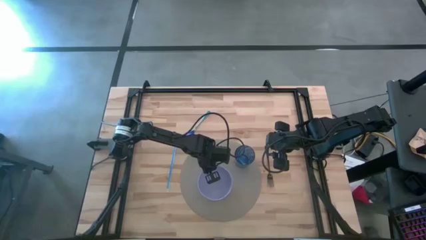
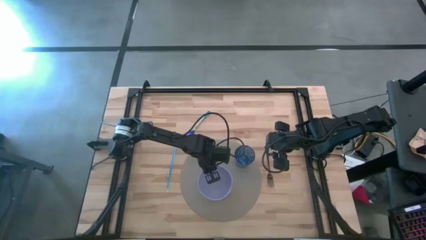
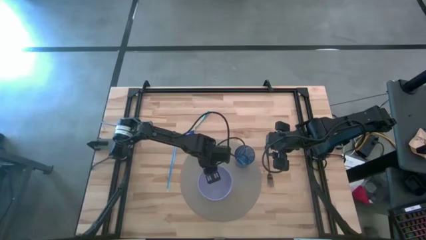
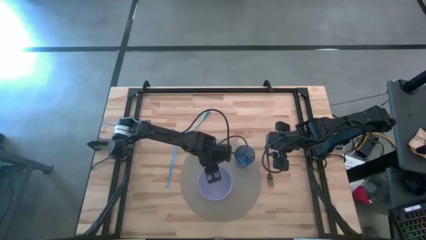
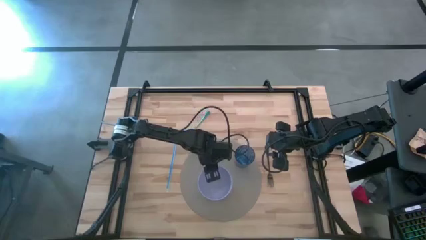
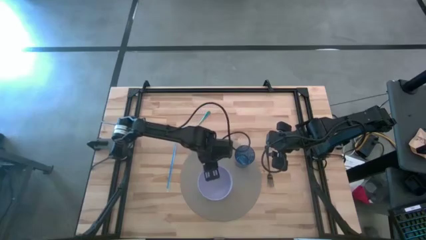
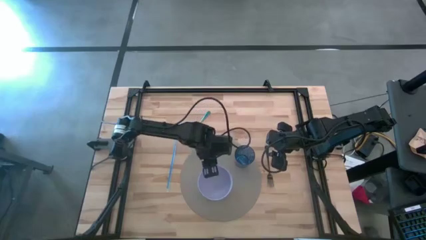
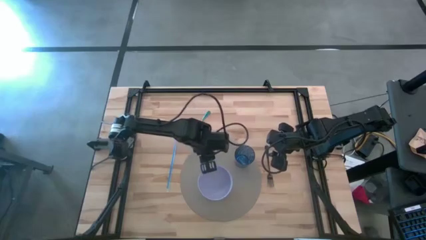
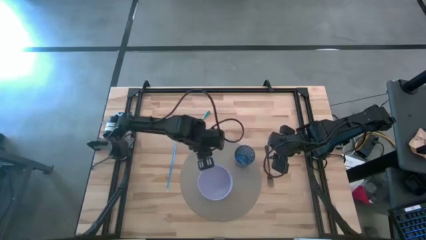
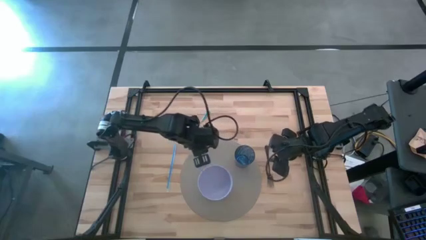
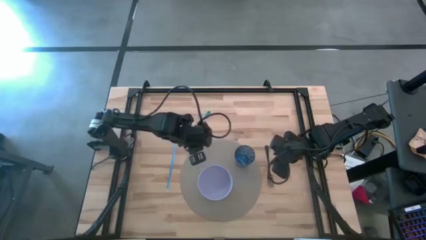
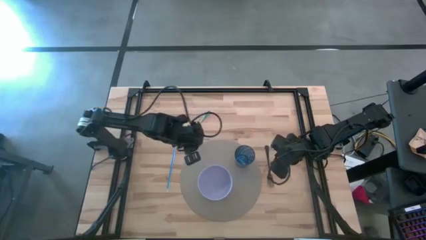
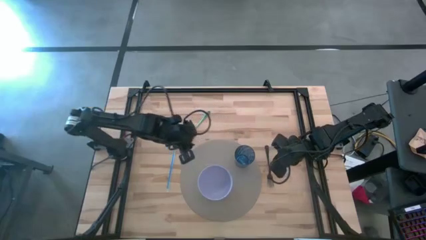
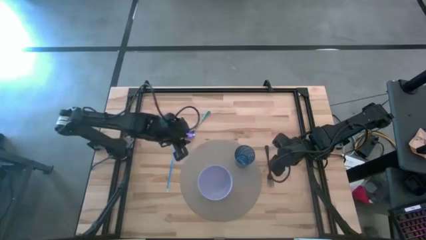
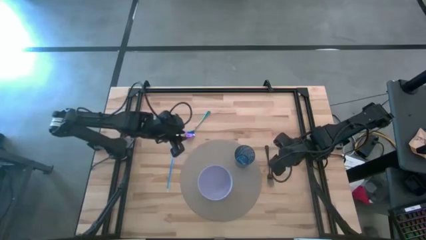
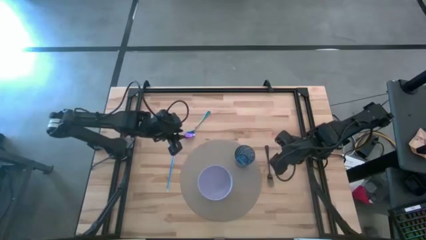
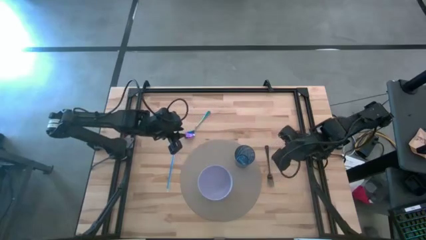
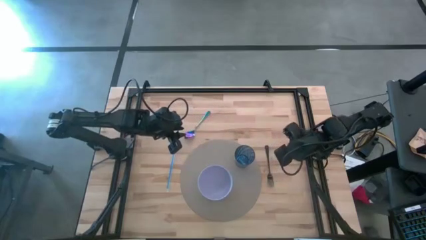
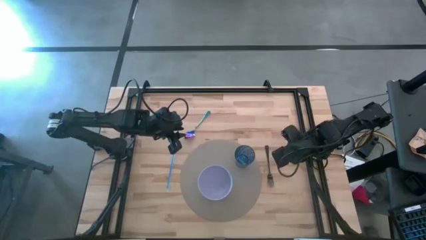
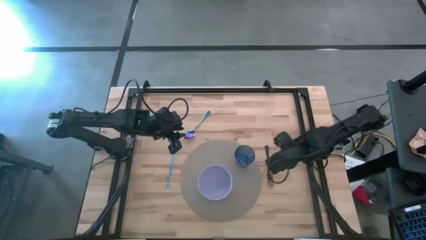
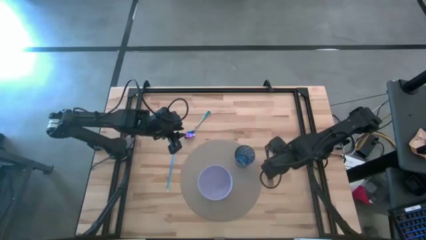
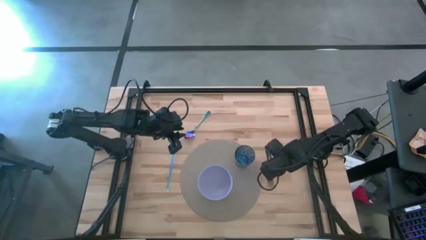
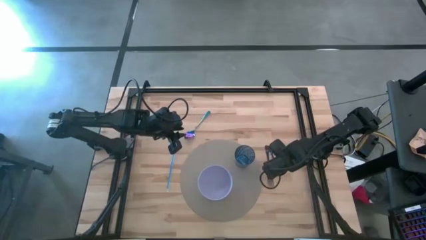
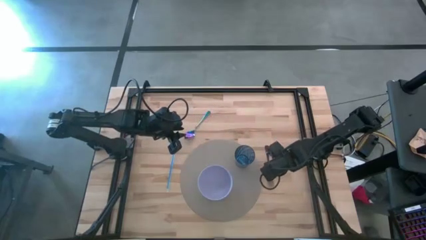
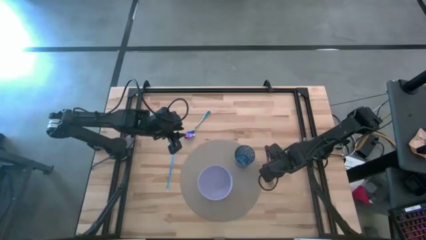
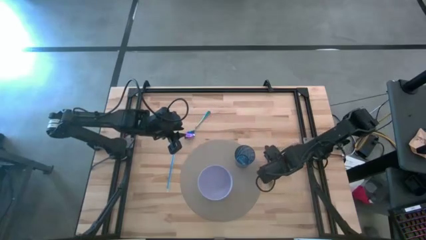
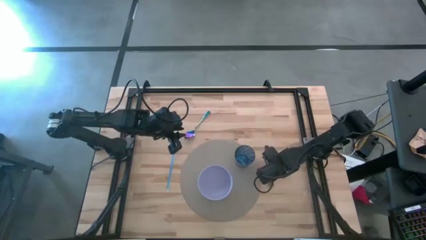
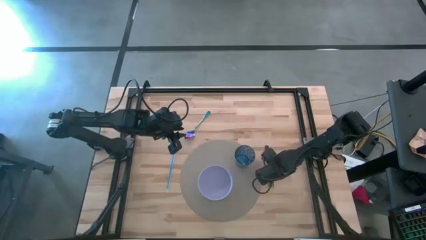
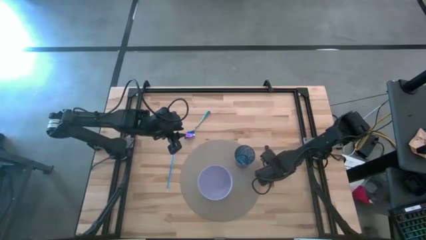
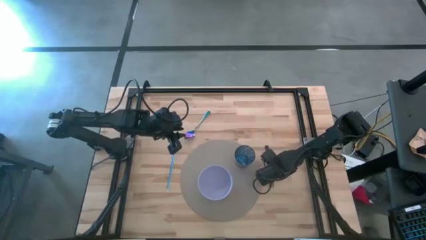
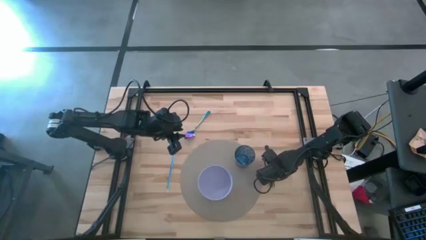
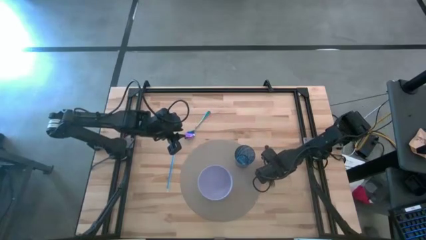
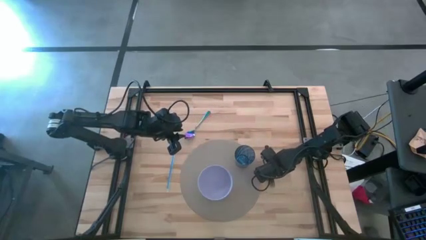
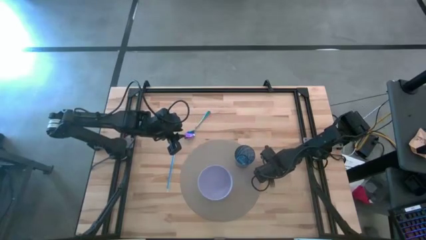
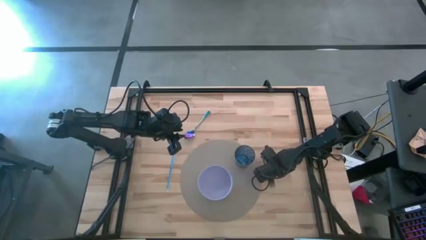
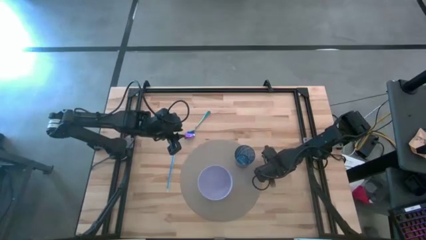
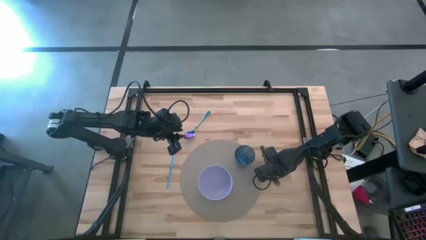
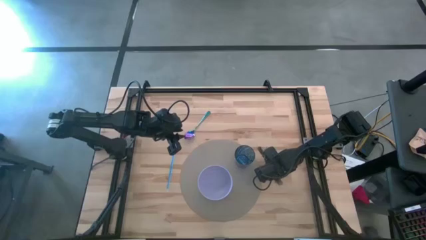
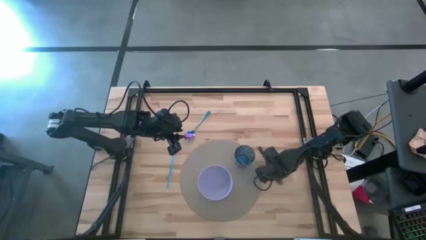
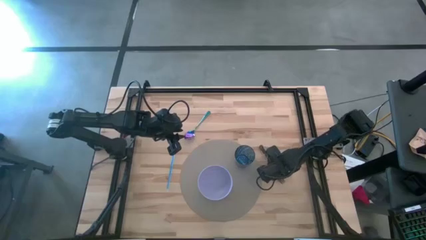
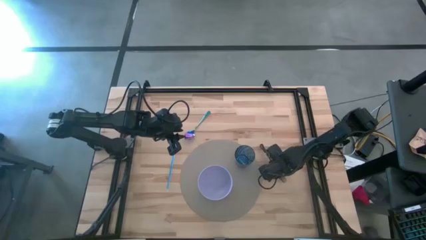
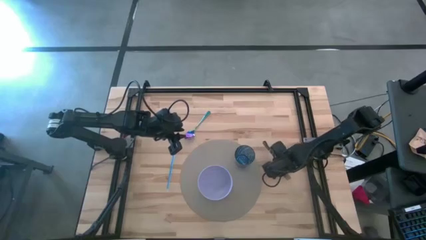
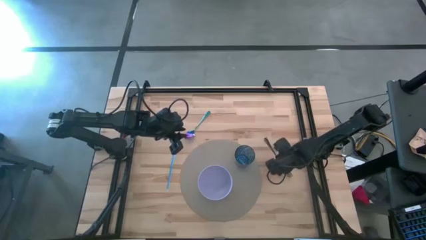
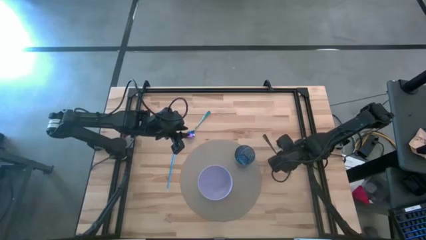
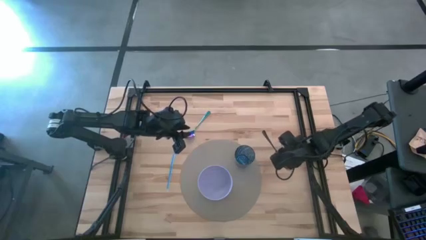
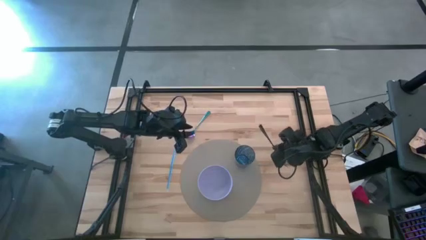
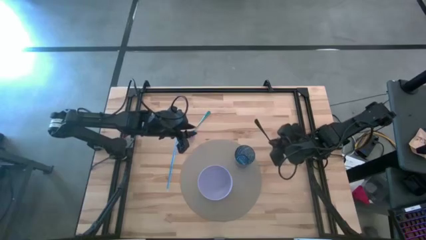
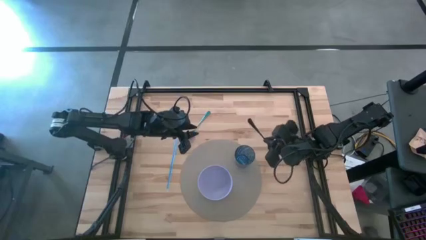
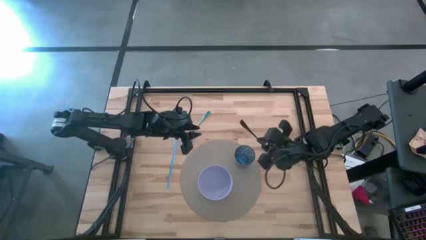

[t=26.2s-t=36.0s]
Task: Pick & Place Utensil
Put the fork into the bowl

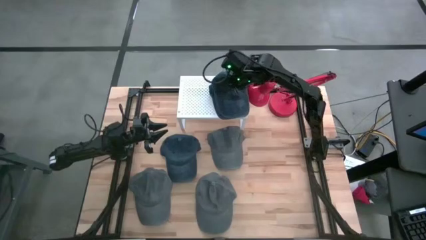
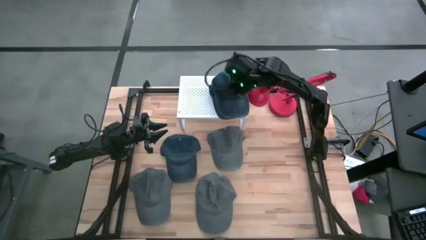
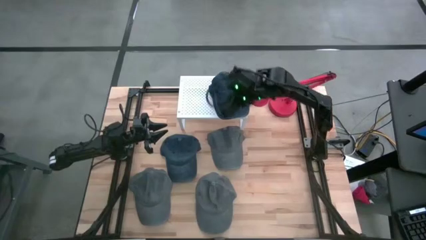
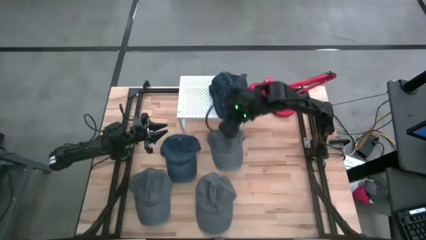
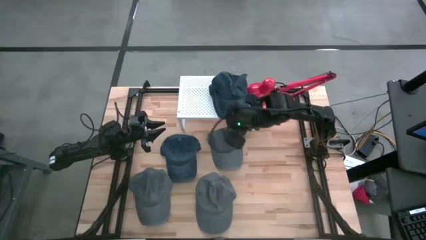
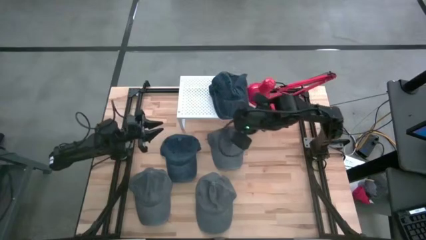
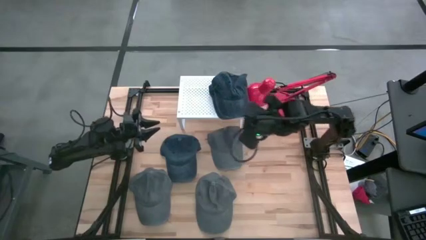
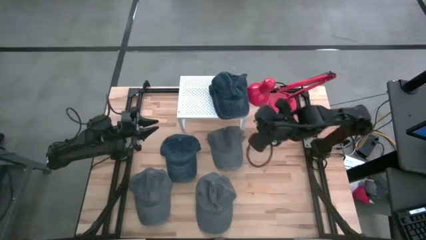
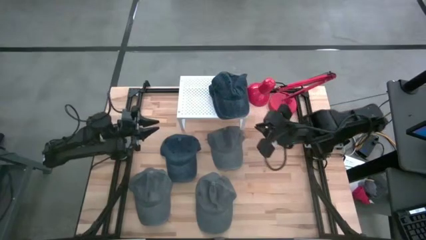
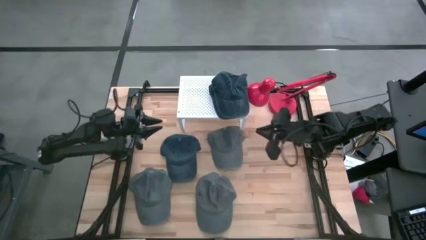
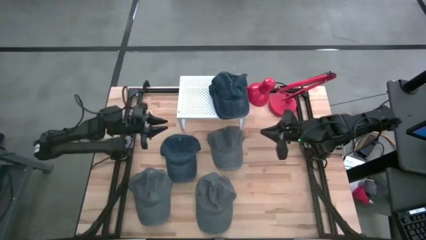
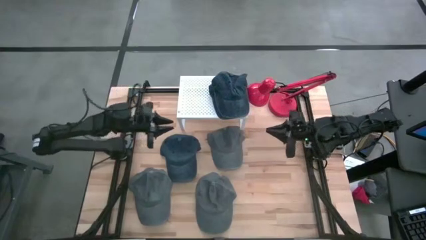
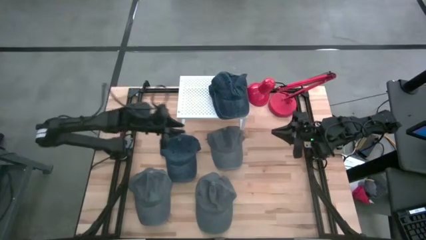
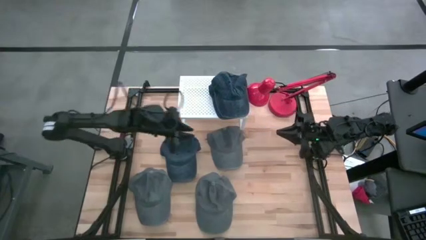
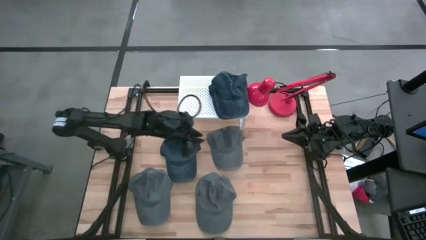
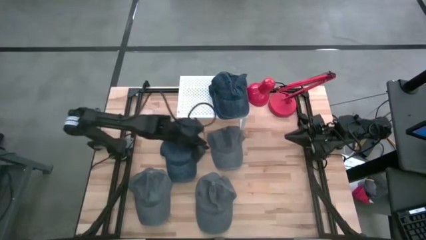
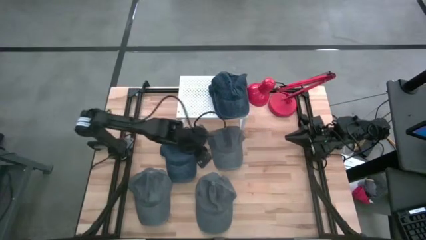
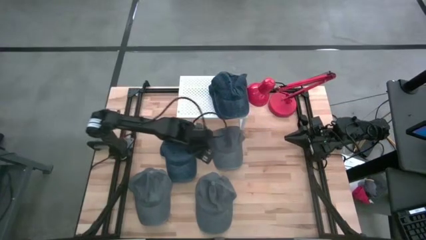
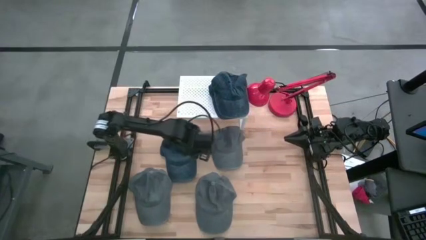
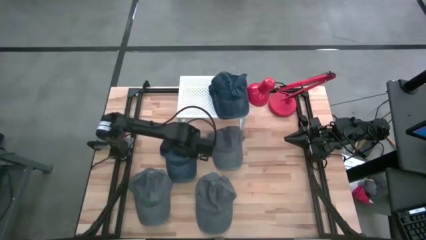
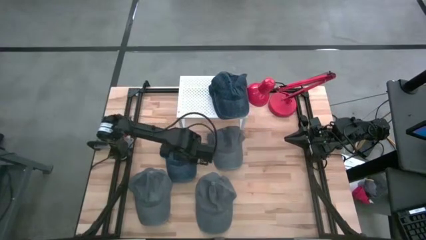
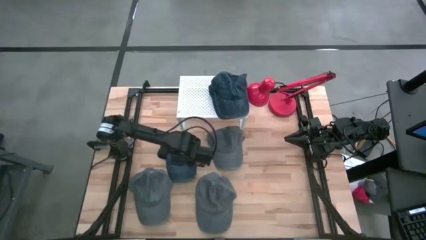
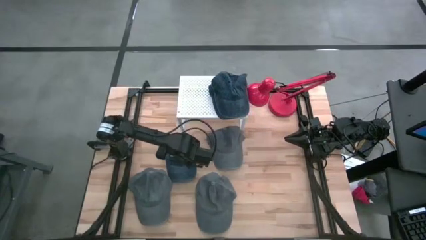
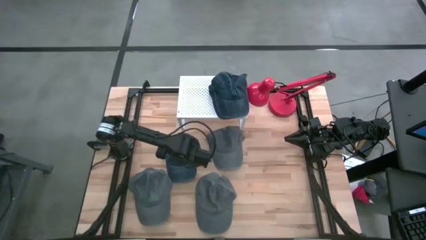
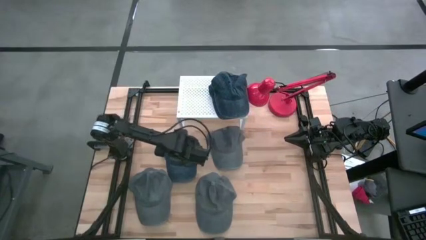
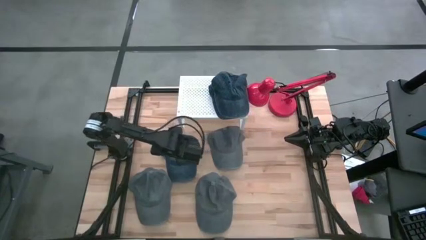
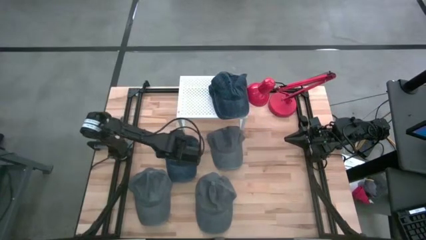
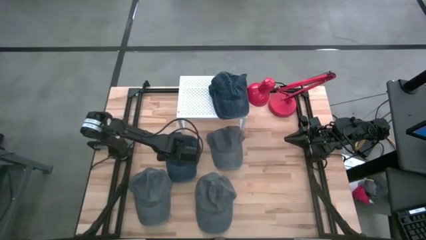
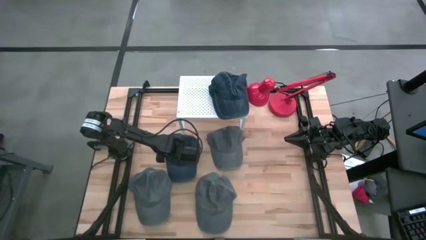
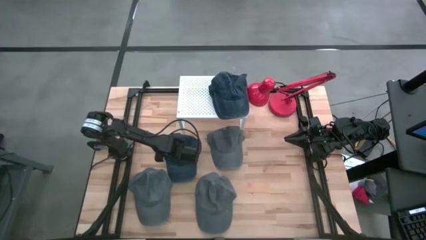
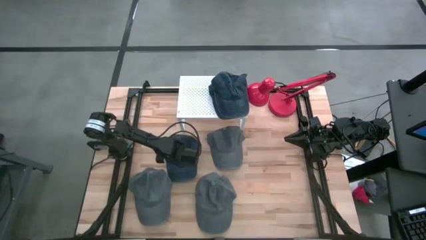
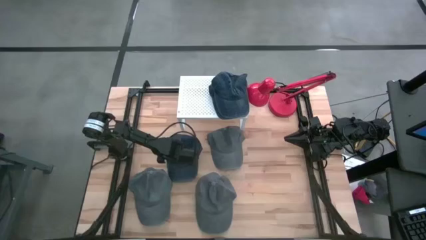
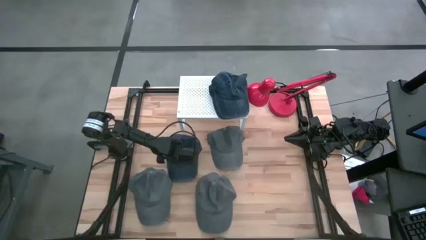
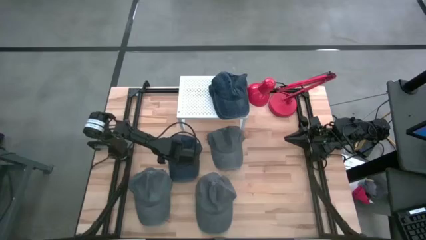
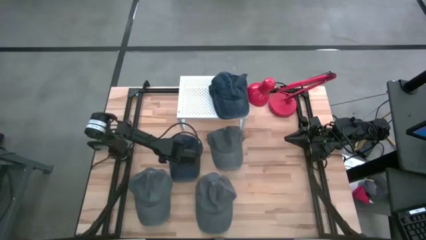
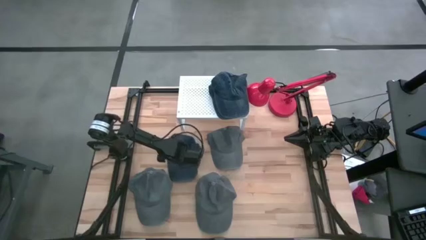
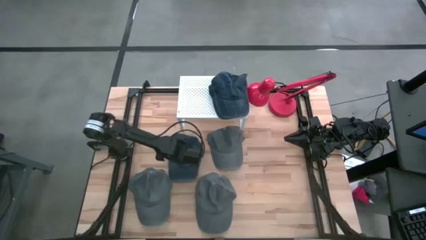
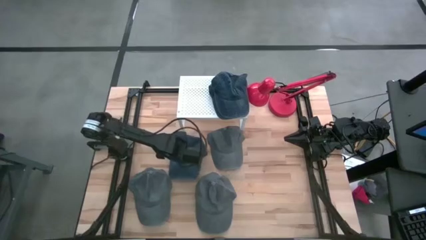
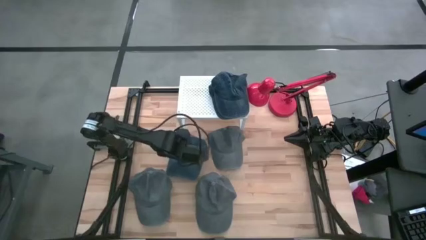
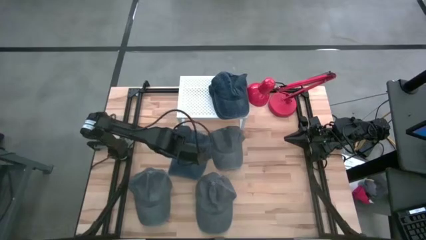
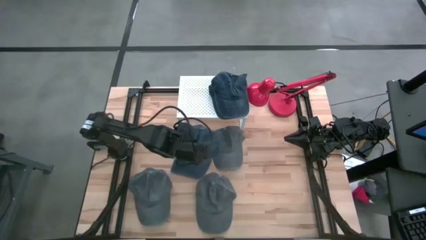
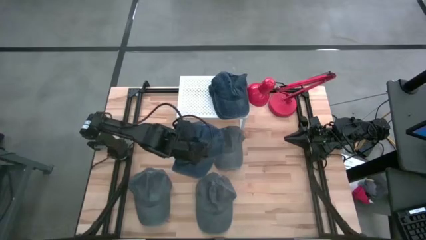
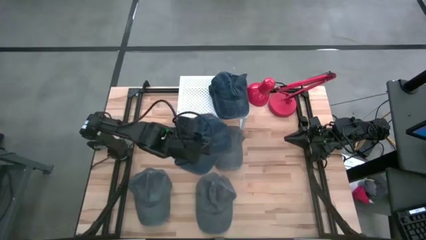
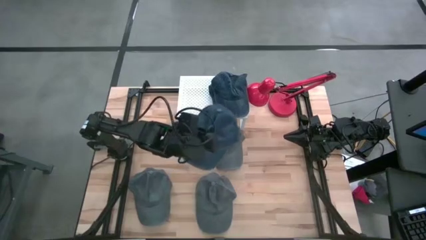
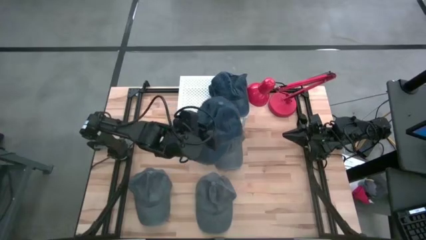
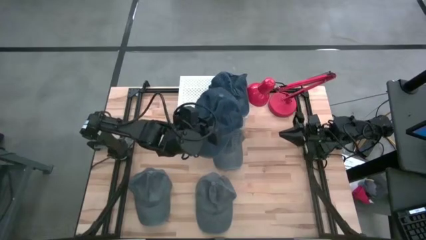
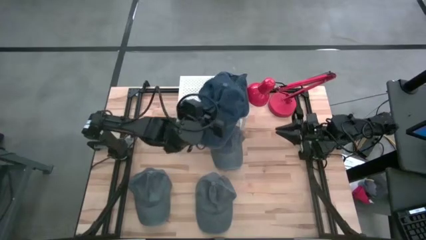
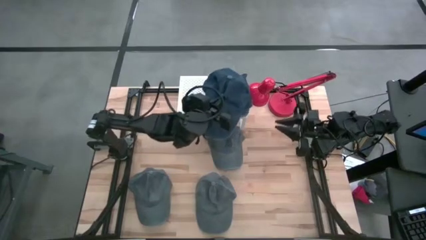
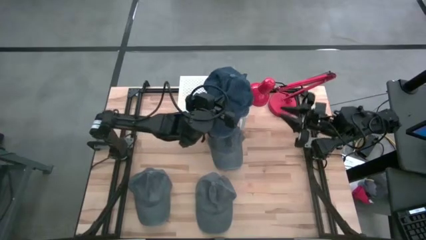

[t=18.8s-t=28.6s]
Task: Pick & Place hat
Stack the gray cap on the top of the other gray cap on the shelf
